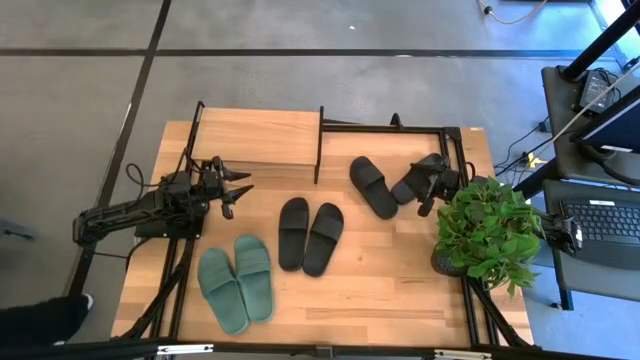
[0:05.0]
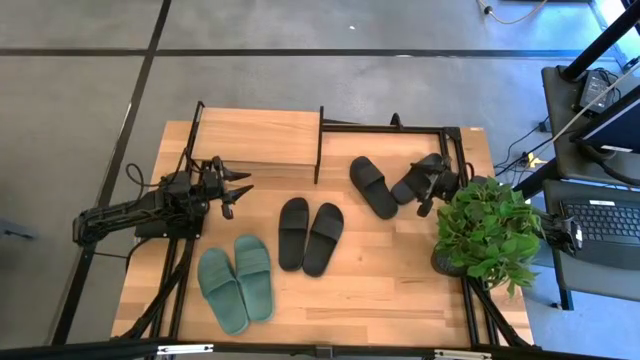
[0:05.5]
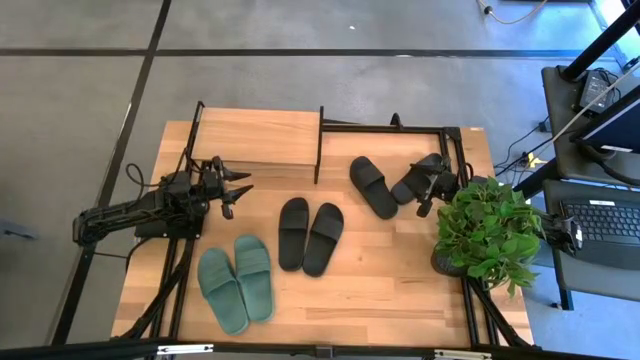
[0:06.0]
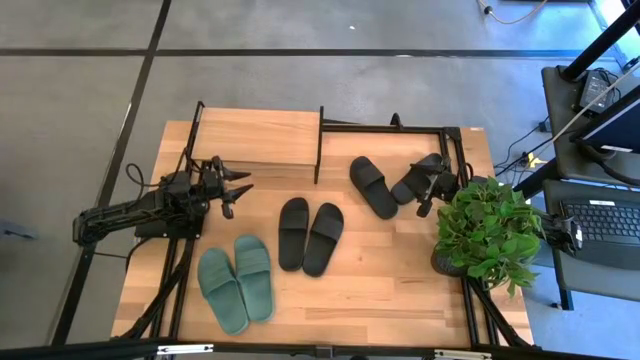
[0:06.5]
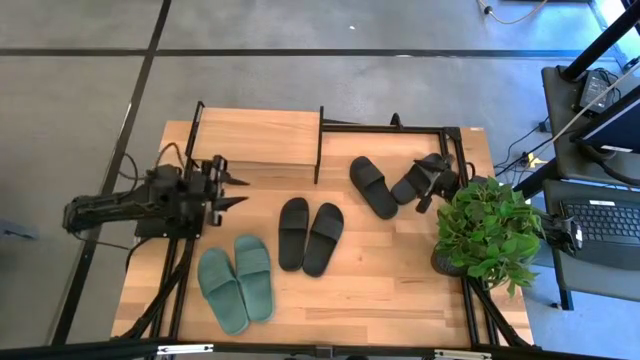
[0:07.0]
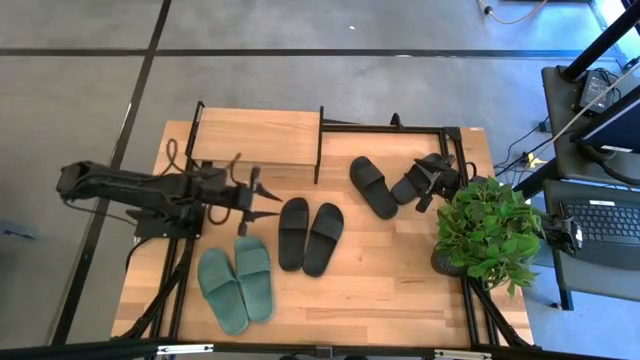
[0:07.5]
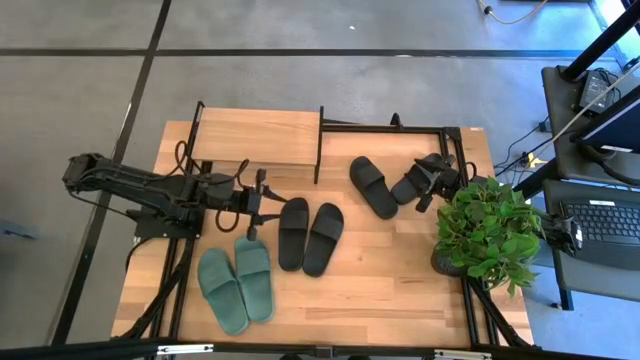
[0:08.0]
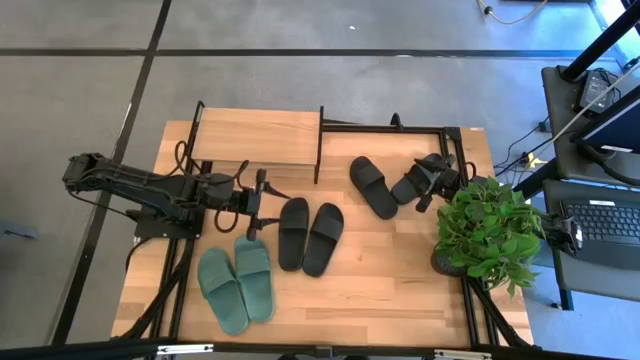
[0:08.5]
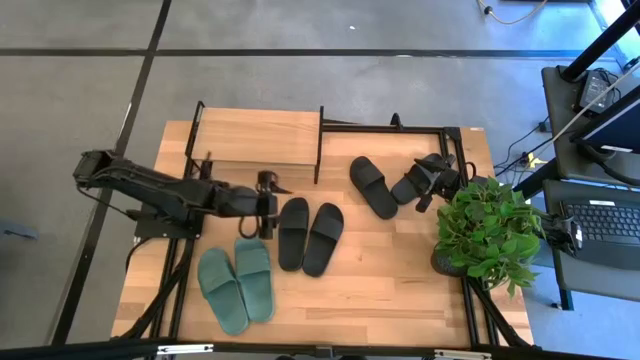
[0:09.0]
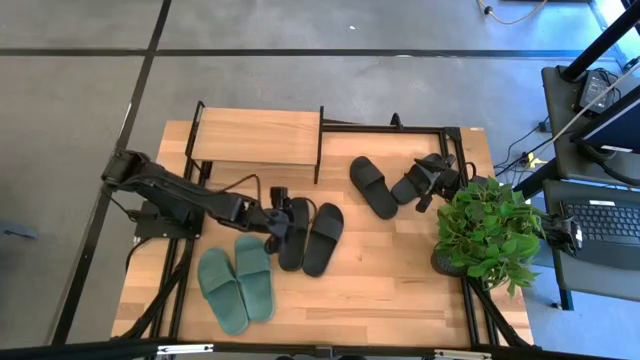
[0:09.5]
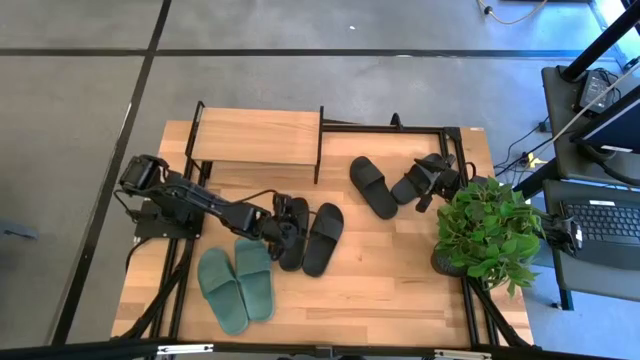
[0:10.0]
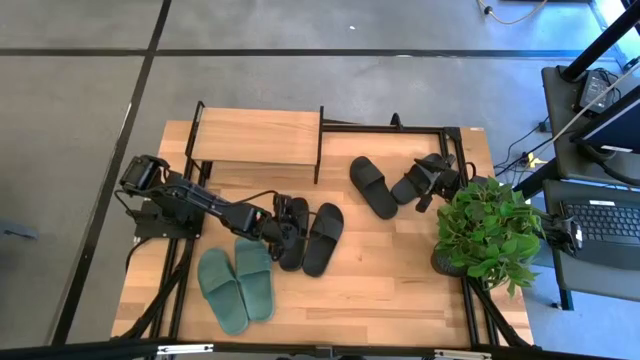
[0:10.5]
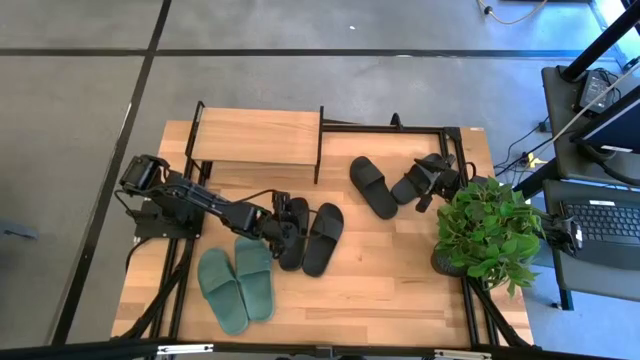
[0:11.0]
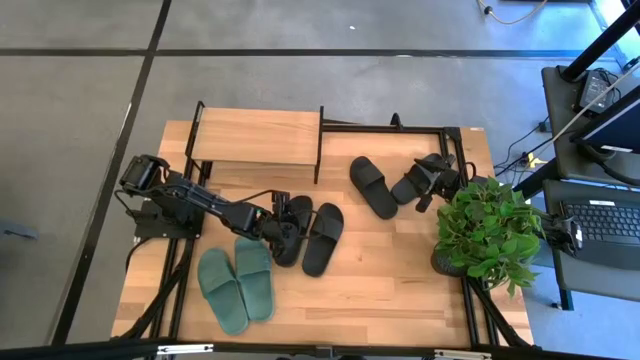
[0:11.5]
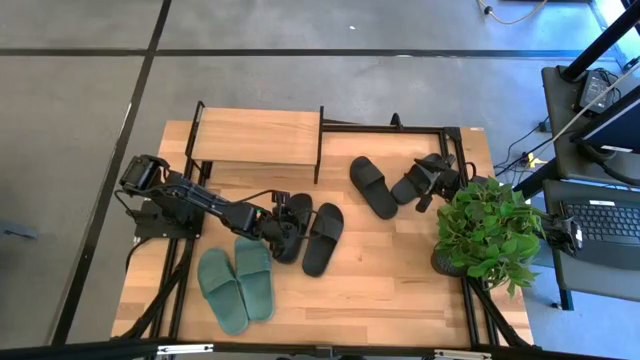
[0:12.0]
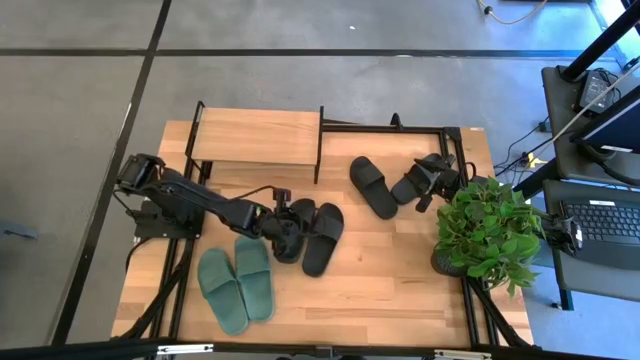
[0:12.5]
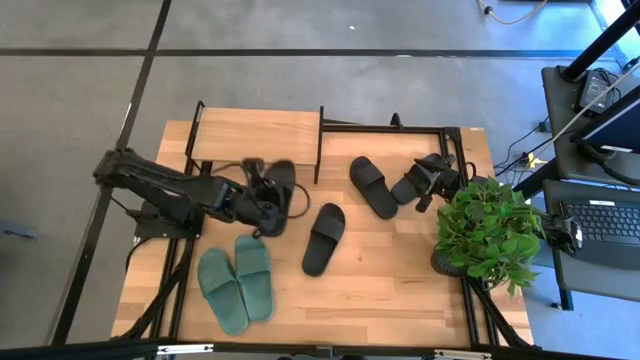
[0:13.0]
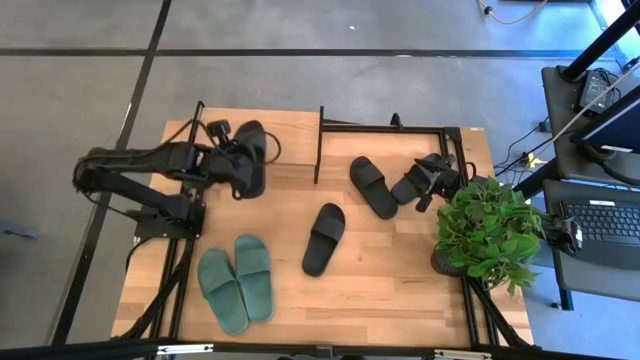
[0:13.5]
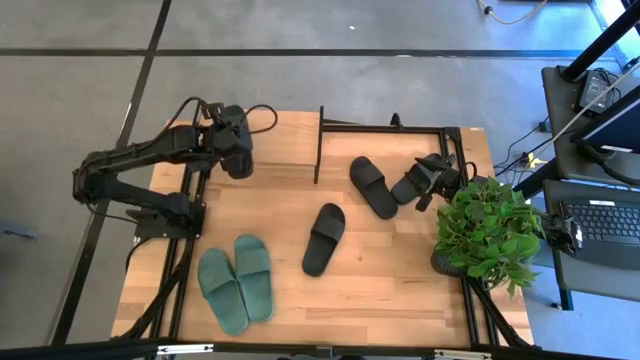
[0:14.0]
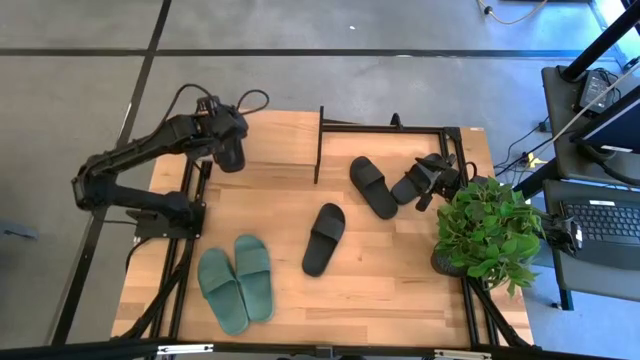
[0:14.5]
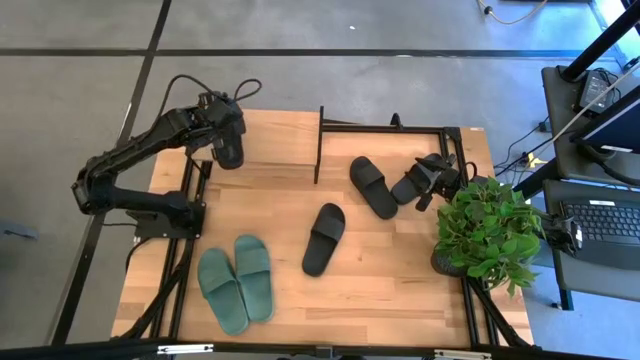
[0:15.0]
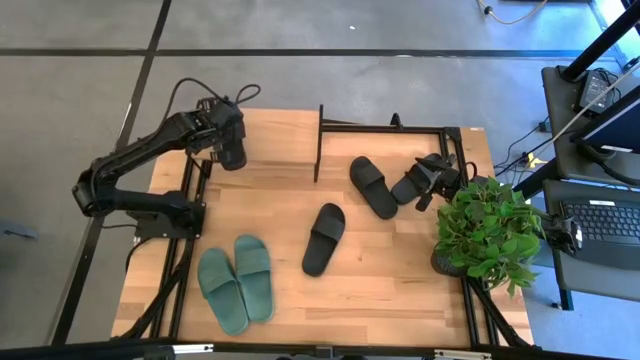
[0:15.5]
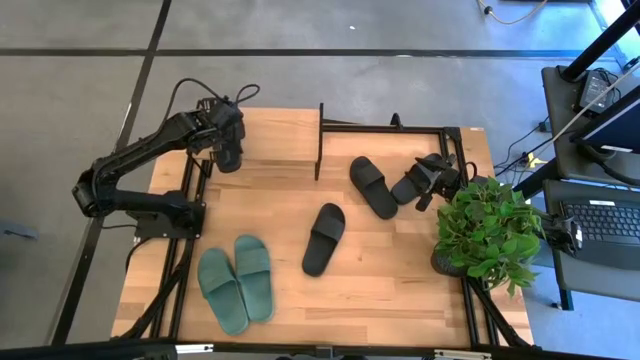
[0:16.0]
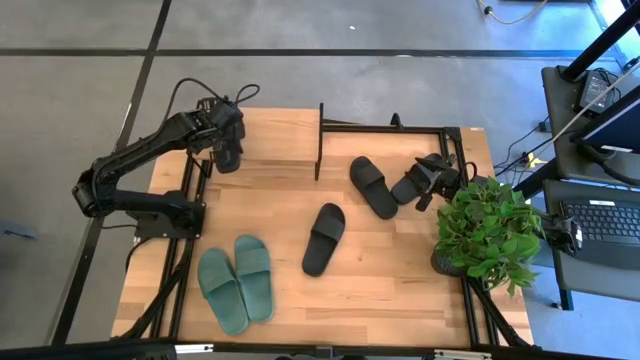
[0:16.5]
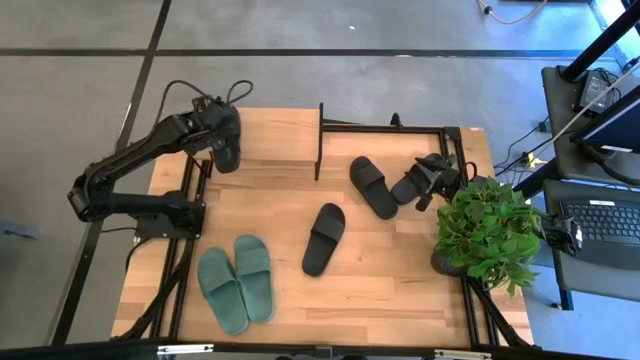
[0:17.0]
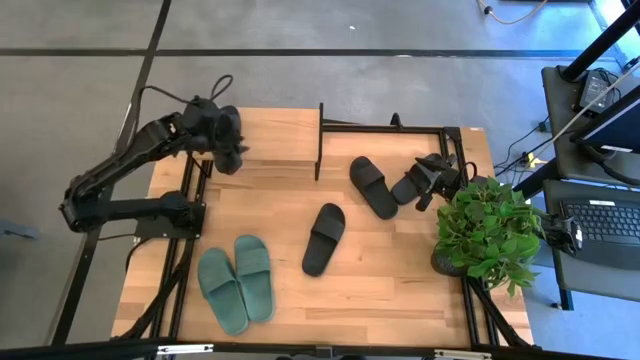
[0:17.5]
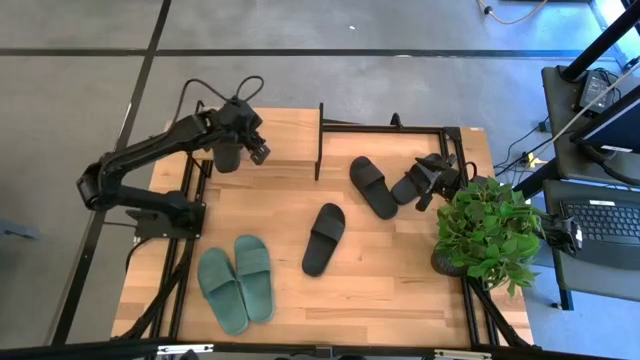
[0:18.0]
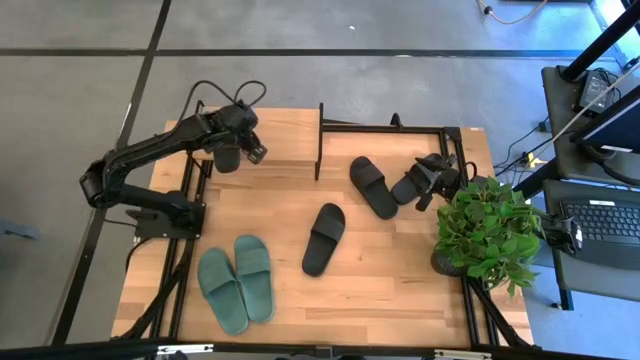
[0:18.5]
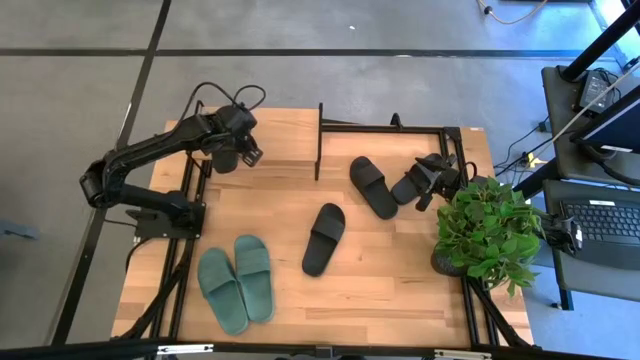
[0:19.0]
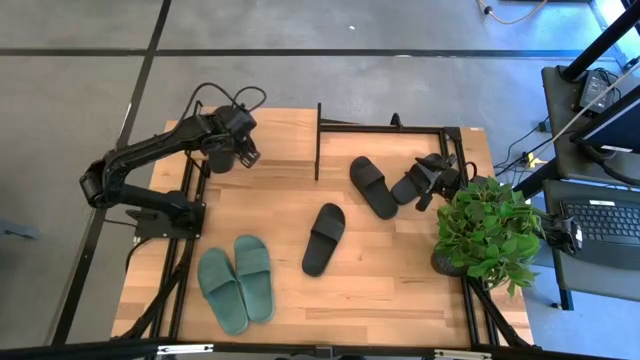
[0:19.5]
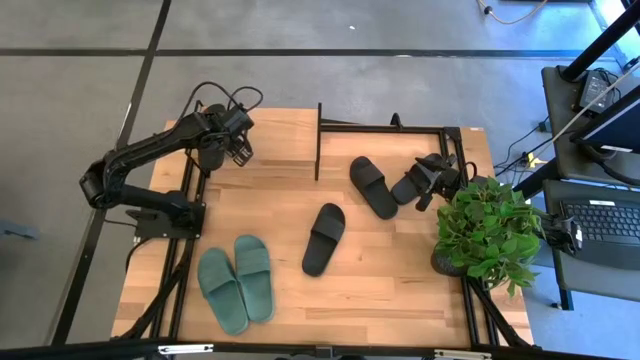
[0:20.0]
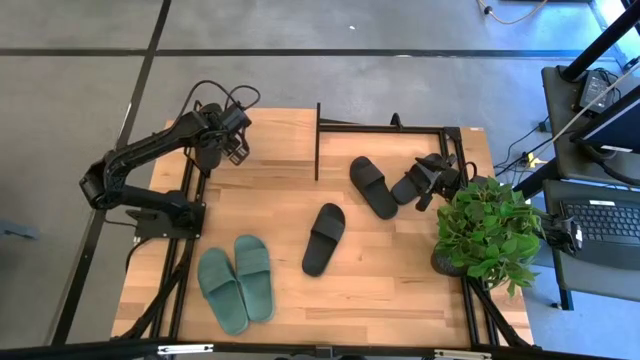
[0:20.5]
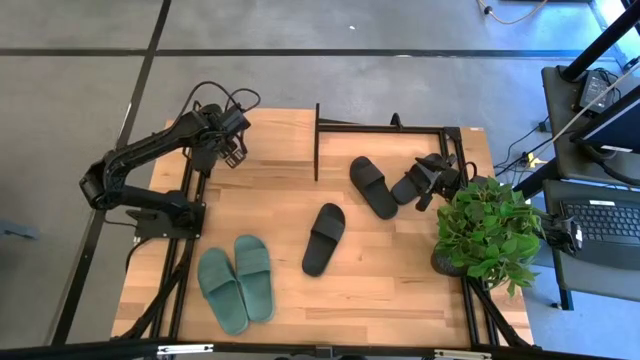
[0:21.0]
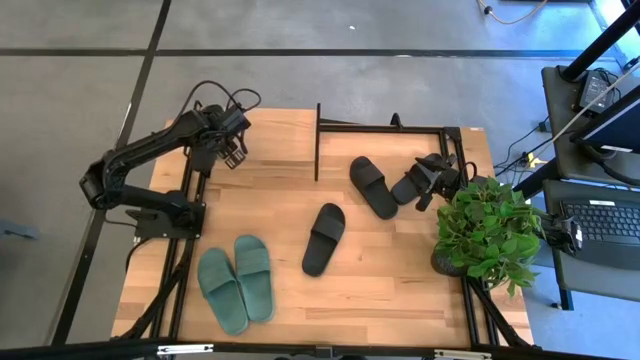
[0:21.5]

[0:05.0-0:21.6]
Task: Pick and place slides into the shelf
Put the black slipper on the shelf
